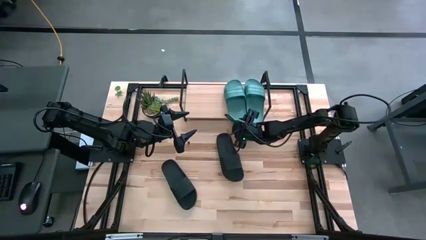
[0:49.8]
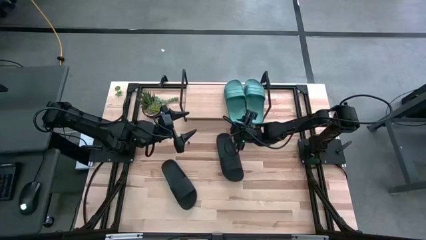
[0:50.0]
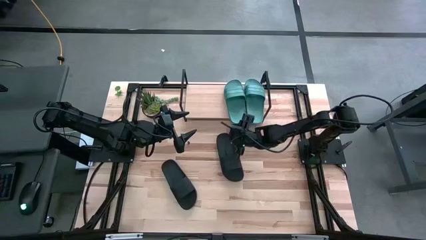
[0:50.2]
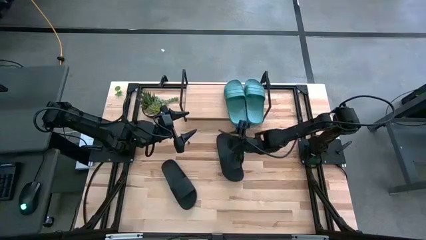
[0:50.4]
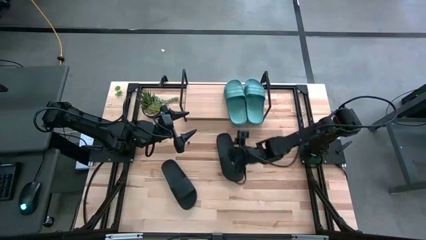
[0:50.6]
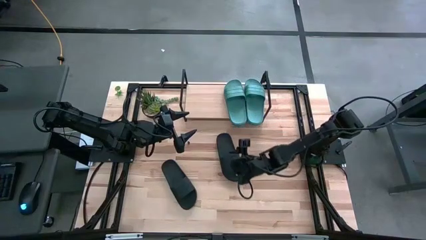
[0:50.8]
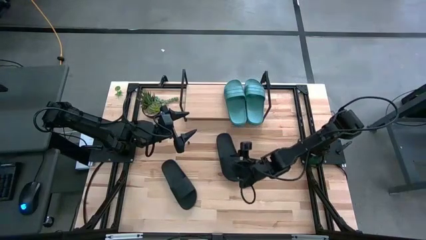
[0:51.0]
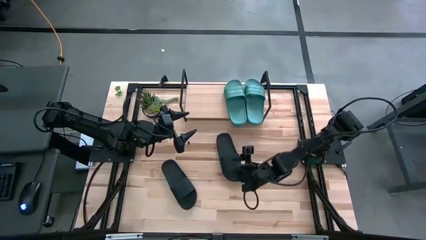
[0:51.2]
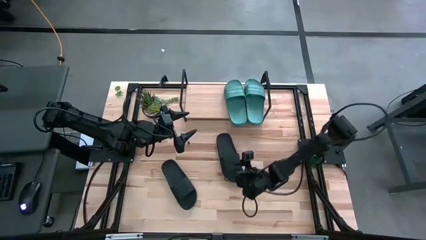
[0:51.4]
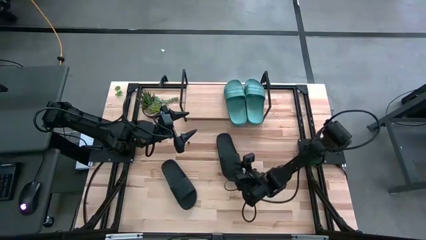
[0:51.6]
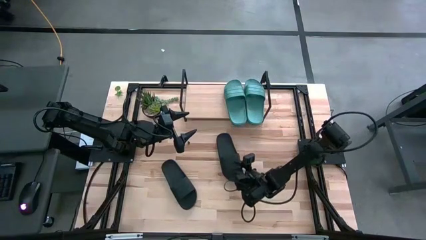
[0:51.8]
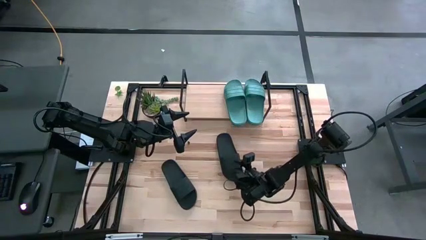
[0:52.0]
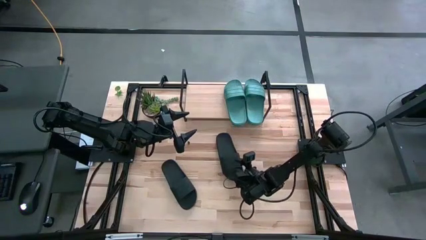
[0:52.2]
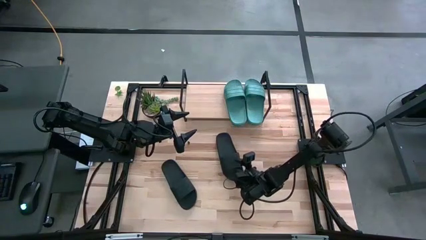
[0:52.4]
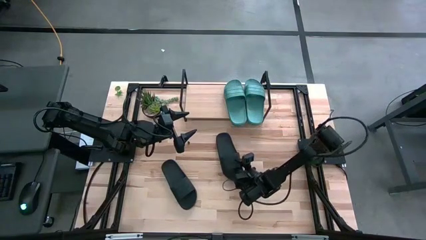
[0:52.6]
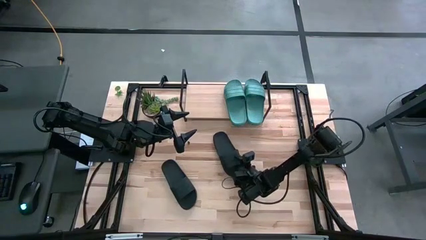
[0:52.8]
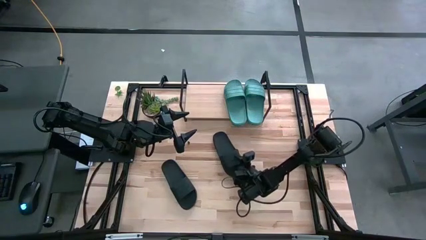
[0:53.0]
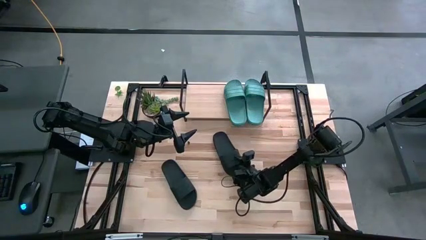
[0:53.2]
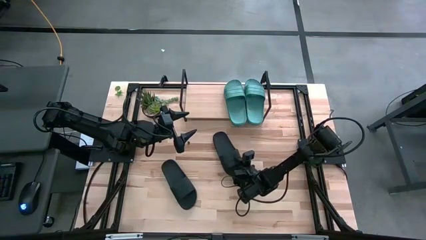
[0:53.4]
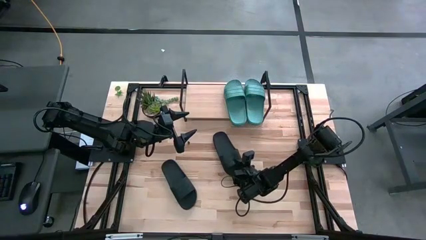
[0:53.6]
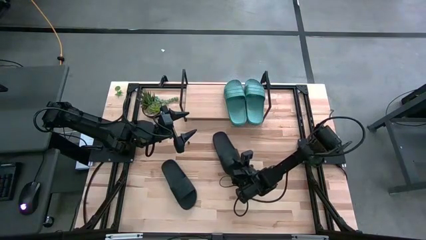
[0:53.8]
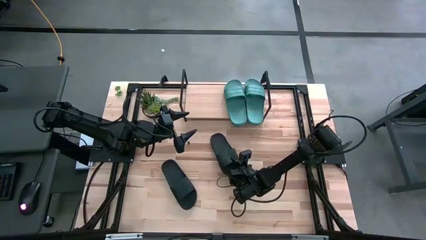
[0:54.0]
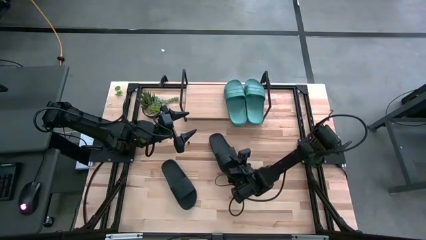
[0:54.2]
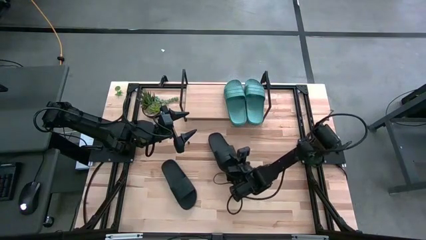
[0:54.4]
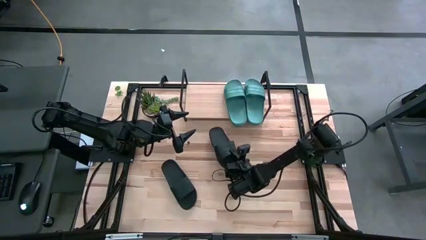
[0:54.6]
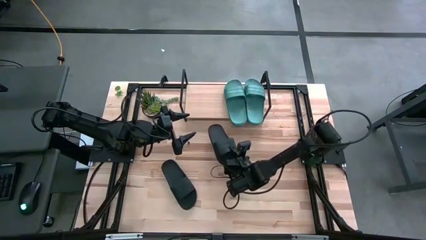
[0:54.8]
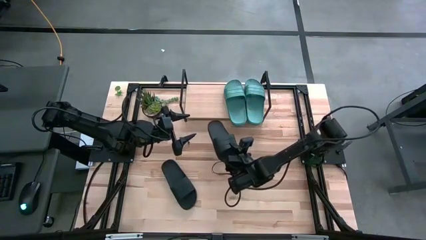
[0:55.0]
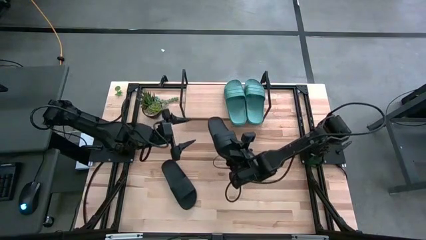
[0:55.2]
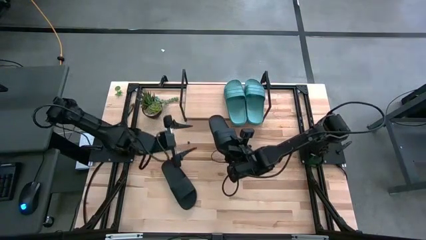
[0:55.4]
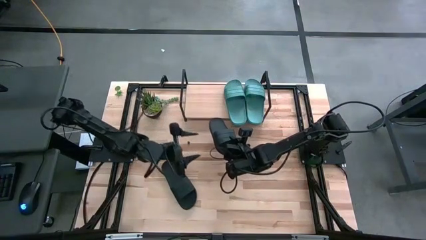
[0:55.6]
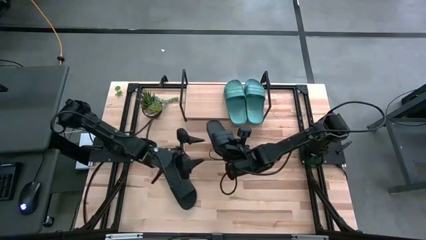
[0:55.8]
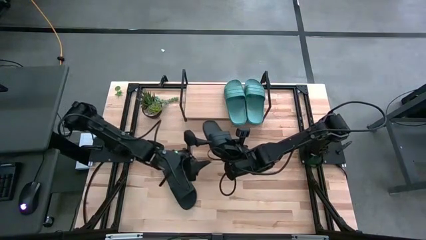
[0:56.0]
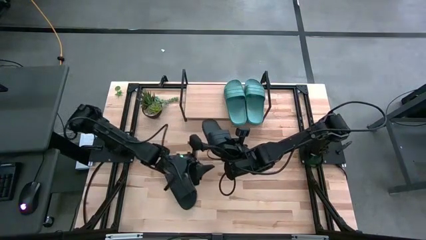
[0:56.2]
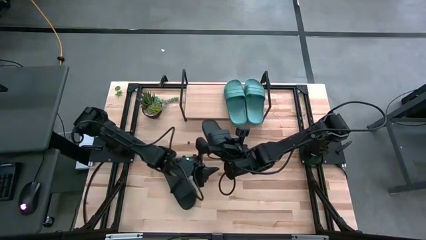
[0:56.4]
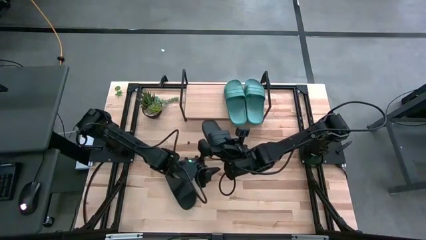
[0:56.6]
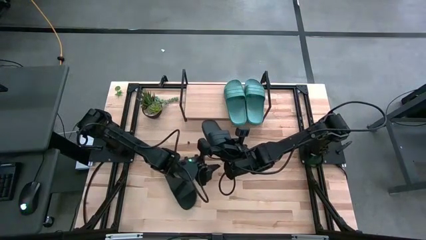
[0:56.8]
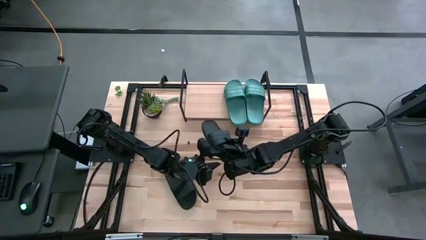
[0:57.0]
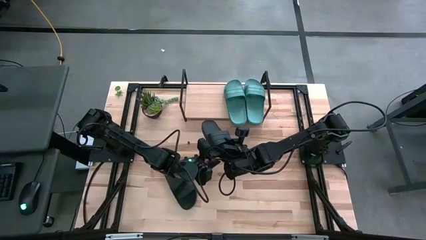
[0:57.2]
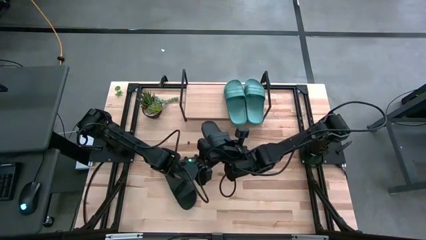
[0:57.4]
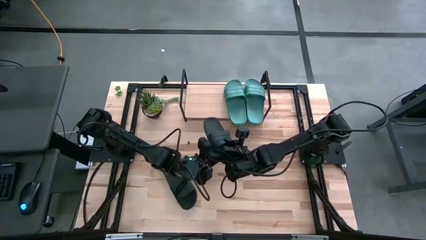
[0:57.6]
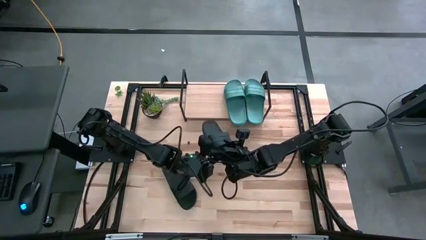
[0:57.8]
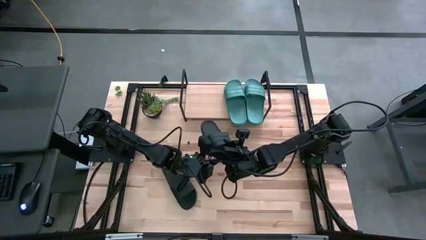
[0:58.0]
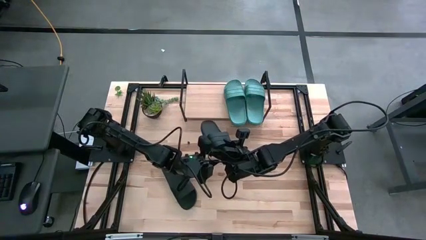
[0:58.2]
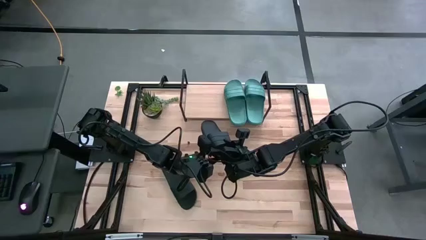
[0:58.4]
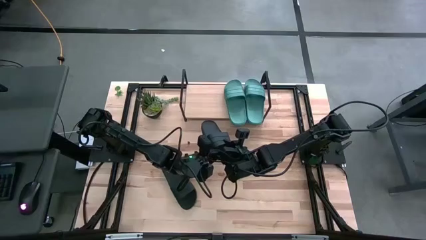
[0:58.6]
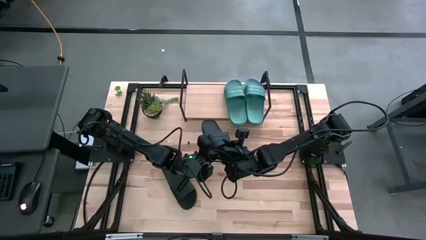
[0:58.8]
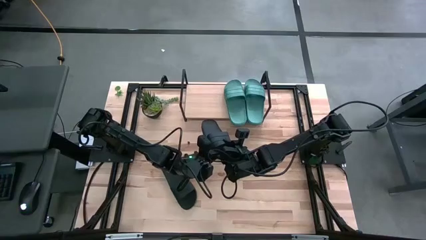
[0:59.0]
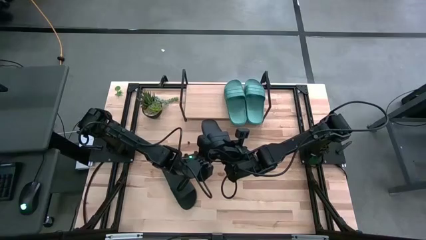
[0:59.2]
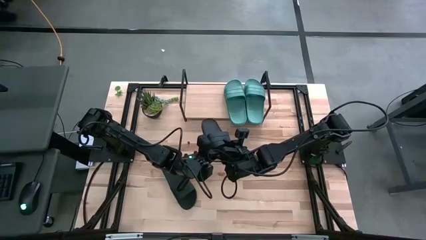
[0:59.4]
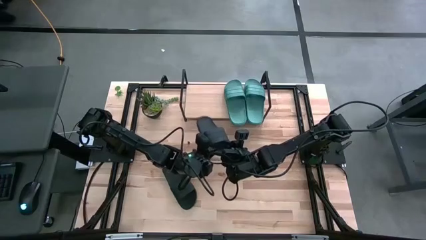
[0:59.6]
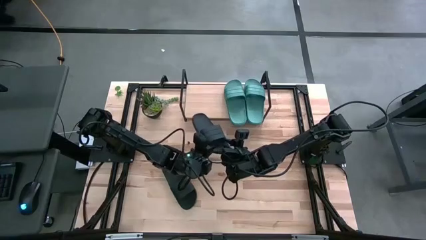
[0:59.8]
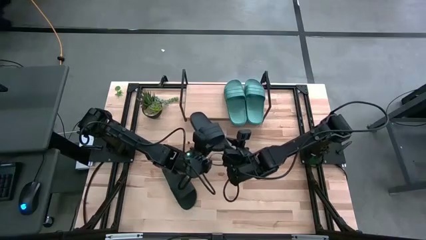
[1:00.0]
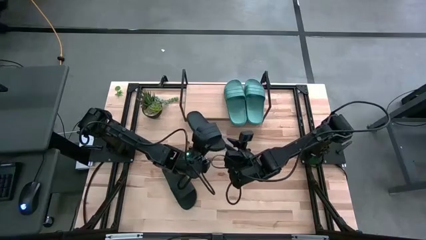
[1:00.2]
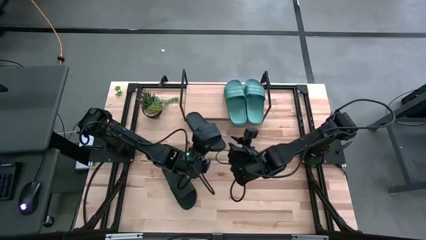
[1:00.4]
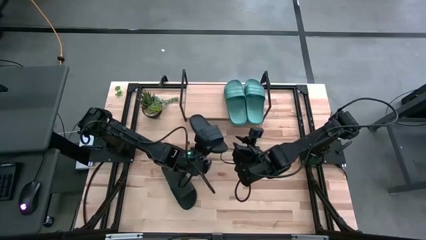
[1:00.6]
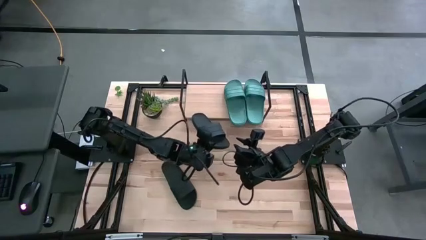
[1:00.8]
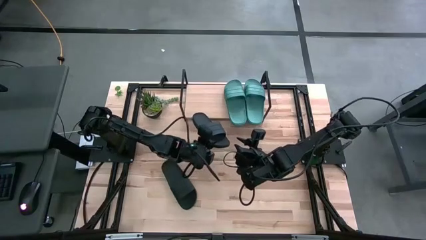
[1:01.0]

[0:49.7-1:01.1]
Task: Pick and place slides into the shelf
Put the right black slide on the shelf

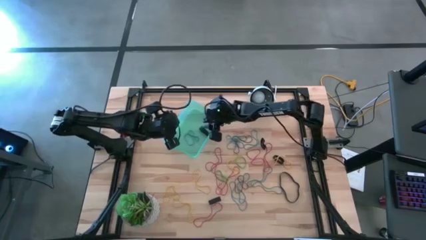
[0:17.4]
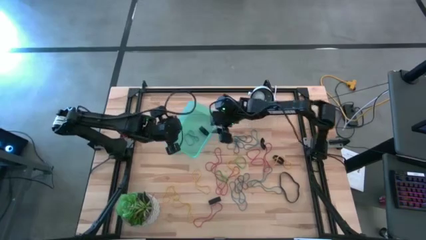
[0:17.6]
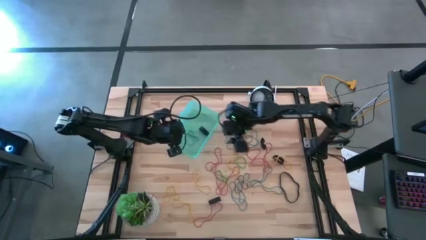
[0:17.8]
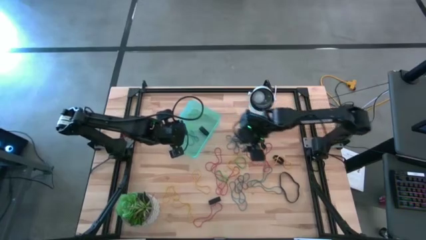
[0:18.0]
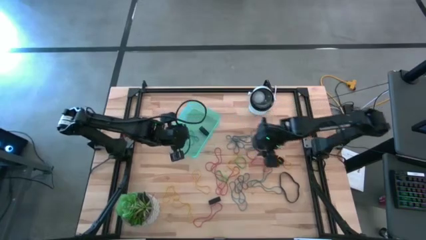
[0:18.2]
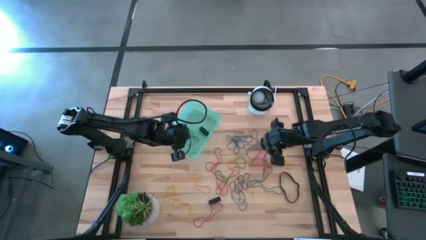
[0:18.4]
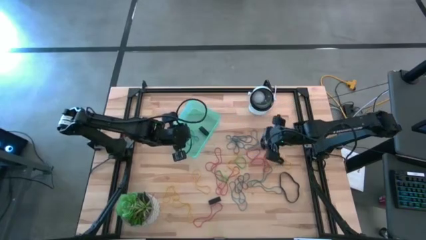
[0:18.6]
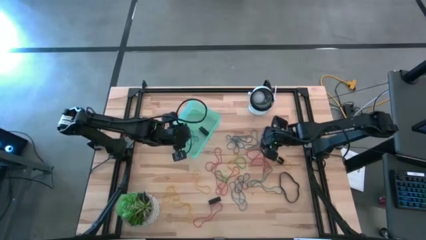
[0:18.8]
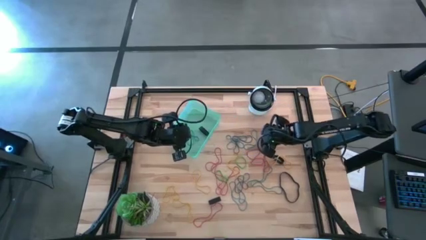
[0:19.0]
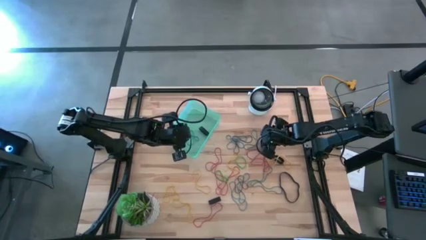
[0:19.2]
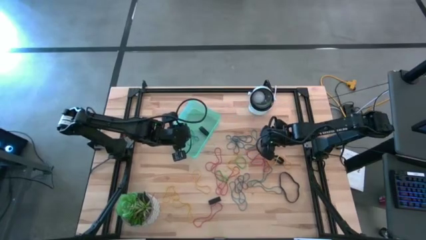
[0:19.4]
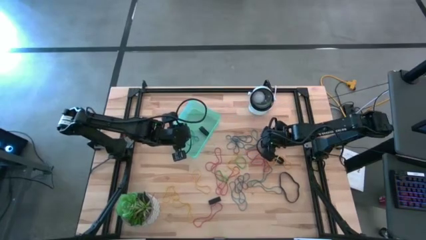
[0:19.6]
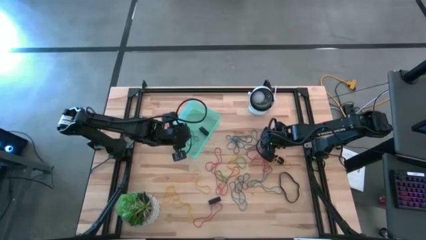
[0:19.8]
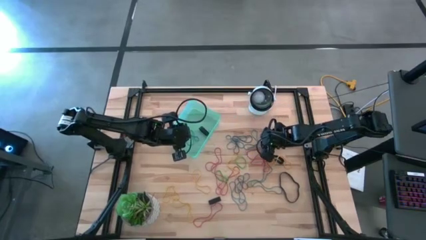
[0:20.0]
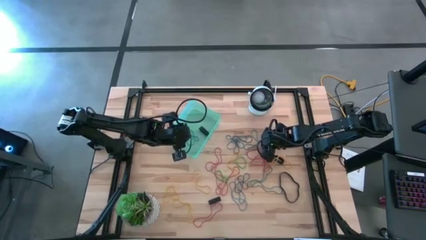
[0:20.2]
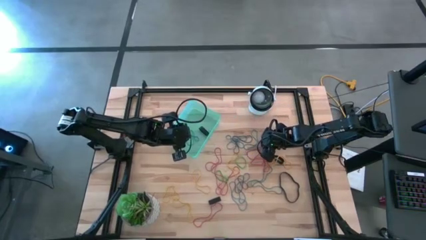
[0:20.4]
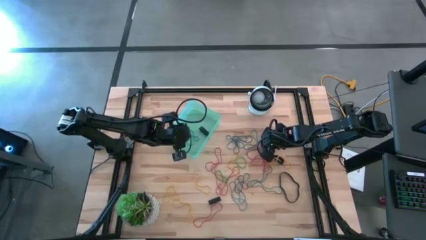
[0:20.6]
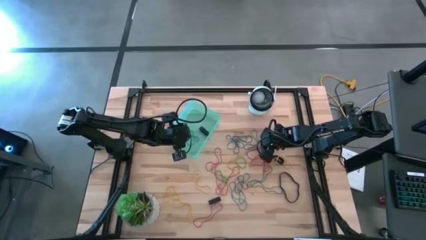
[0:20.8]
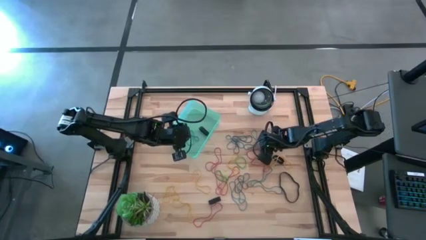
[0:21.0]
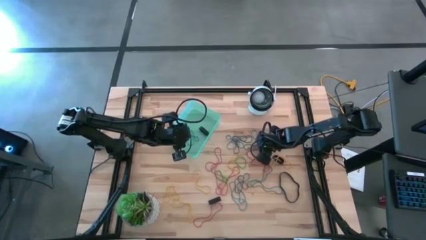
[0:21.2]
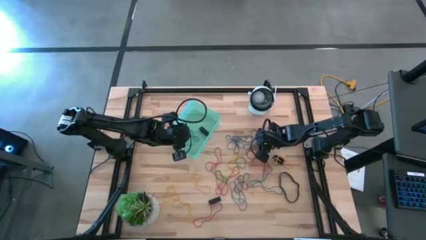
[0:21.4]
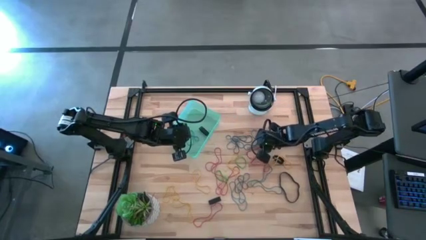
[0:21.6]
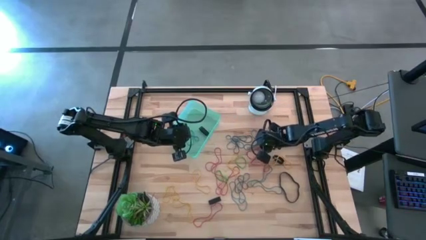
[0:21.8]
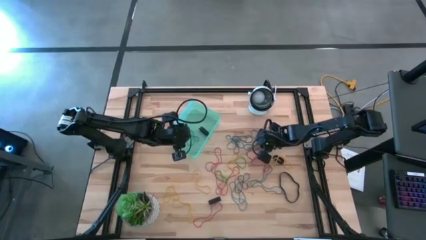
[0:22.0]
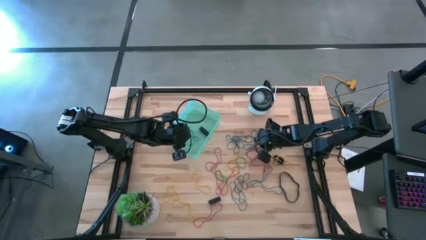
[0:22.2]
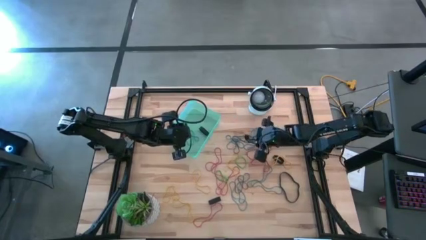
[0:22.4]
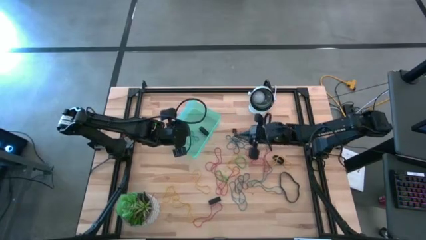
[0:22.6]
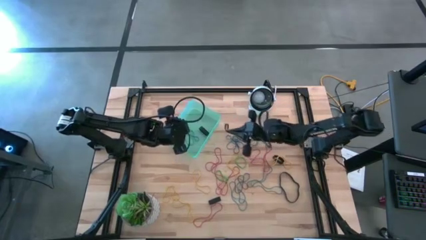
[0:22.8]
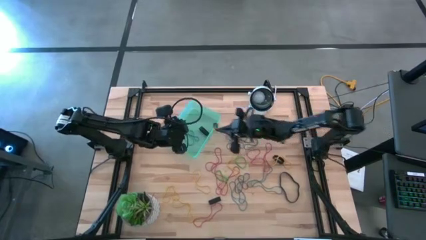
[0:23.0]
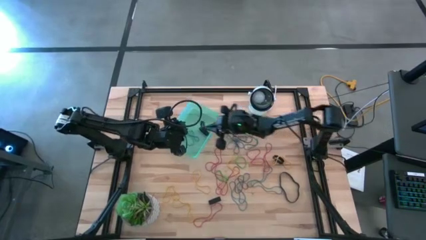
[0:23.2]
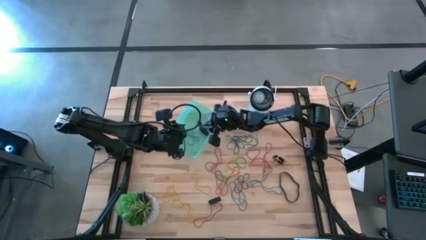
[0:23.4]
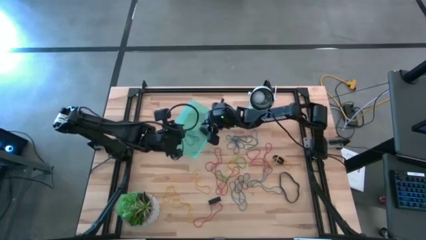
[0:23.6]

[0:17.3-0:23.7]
Task: Pick and place rubber bands into bin
Put the black rubber band into the green bin
